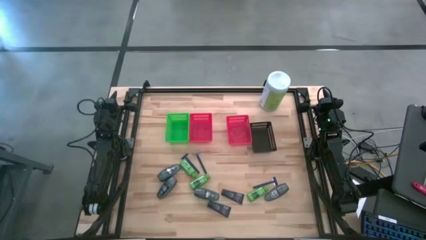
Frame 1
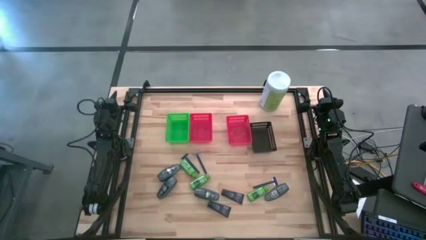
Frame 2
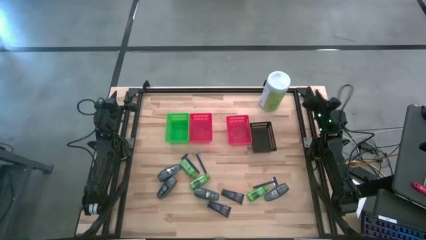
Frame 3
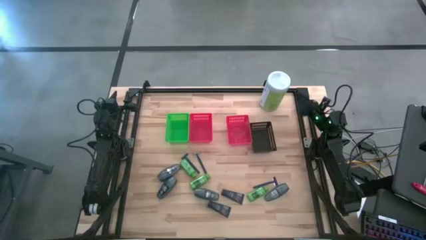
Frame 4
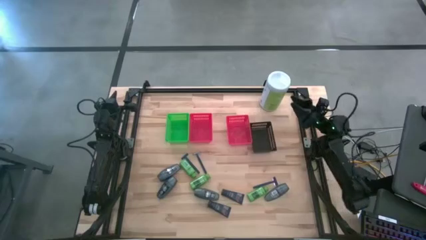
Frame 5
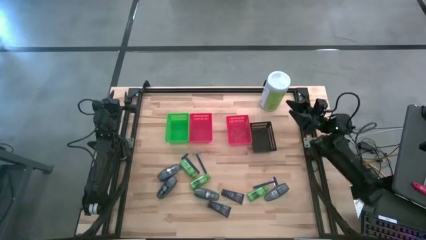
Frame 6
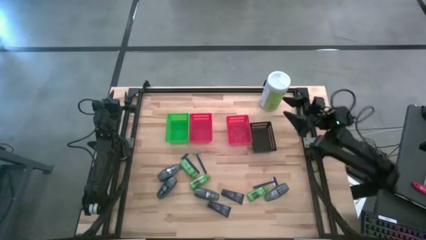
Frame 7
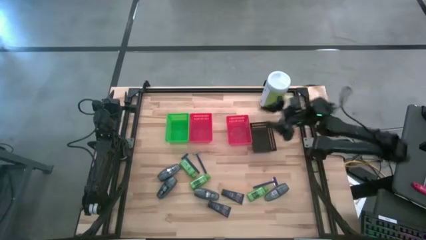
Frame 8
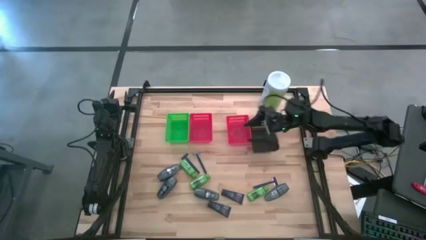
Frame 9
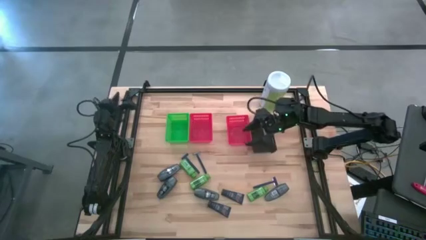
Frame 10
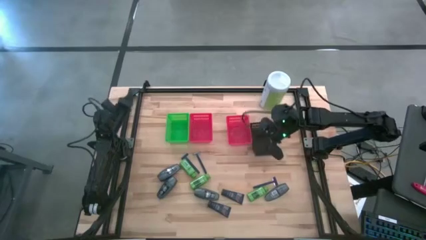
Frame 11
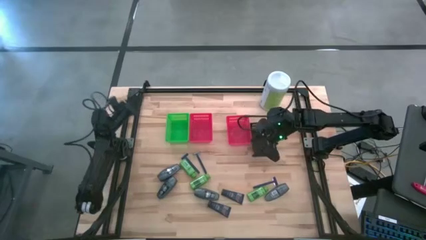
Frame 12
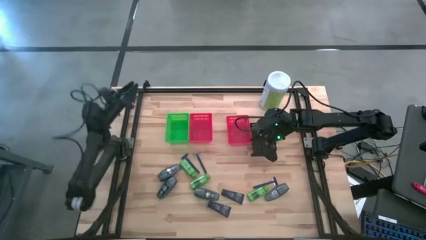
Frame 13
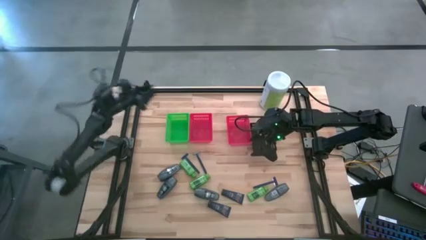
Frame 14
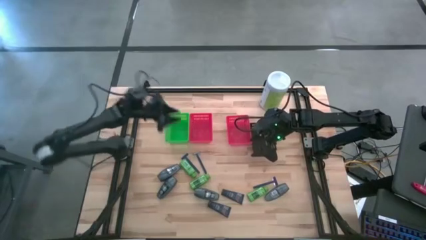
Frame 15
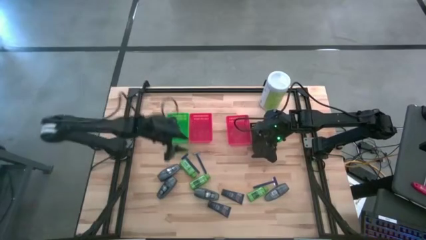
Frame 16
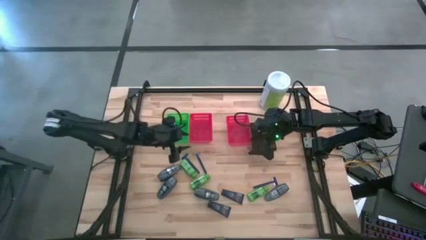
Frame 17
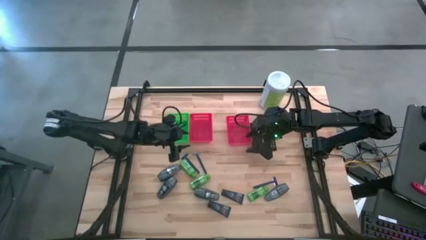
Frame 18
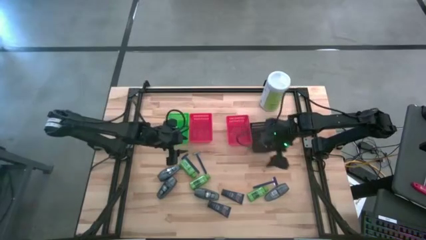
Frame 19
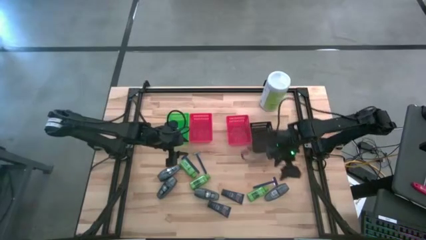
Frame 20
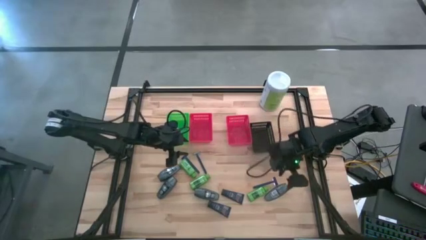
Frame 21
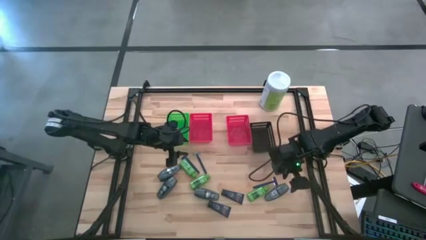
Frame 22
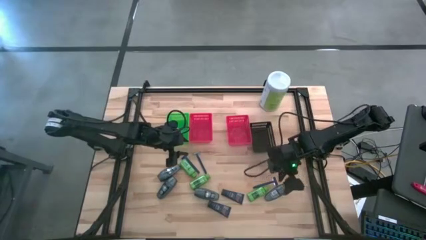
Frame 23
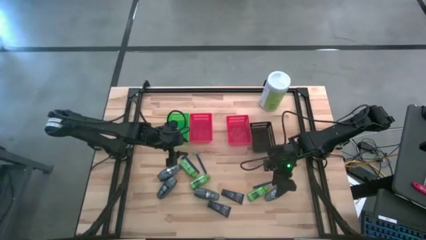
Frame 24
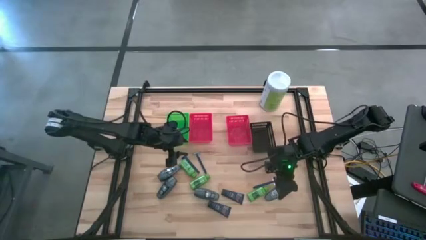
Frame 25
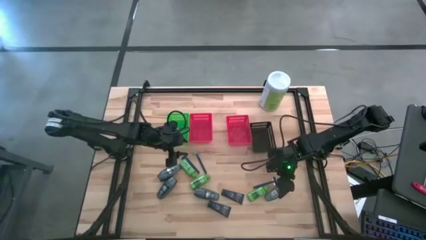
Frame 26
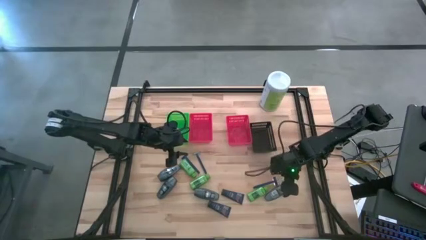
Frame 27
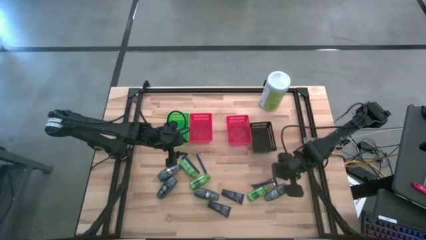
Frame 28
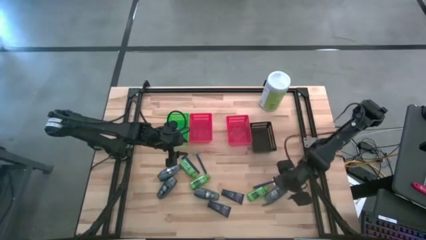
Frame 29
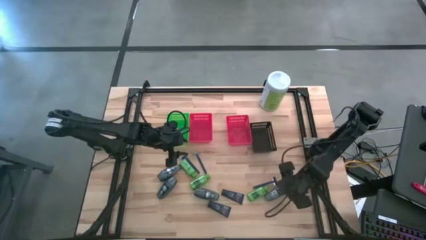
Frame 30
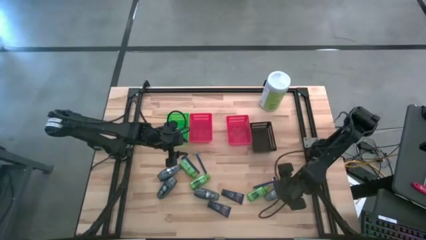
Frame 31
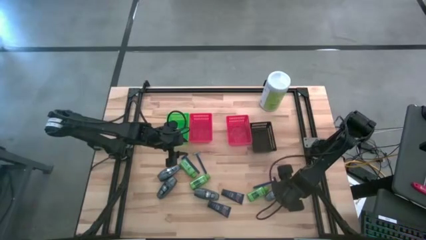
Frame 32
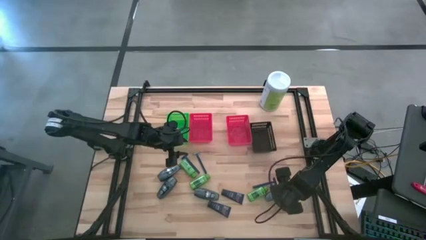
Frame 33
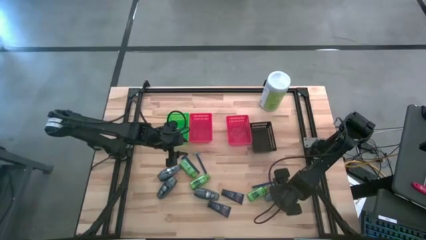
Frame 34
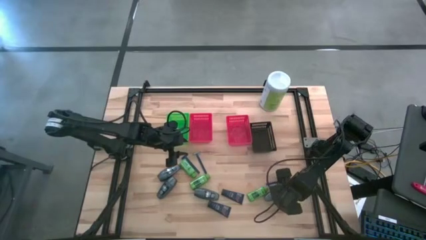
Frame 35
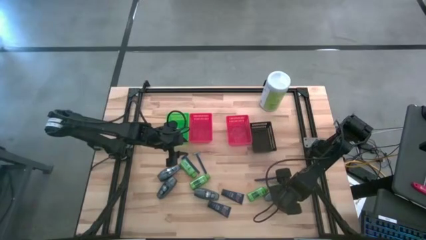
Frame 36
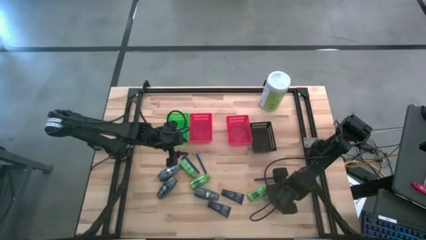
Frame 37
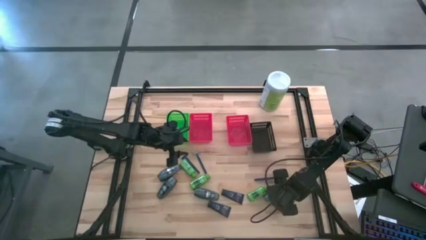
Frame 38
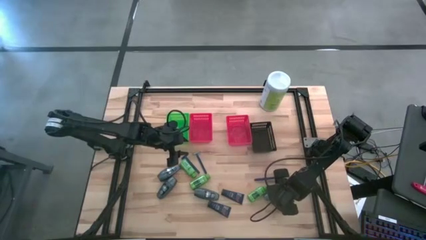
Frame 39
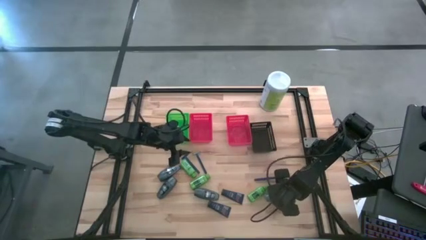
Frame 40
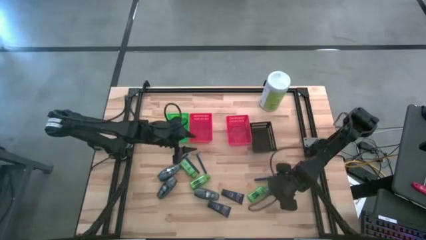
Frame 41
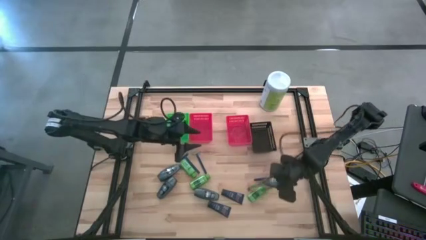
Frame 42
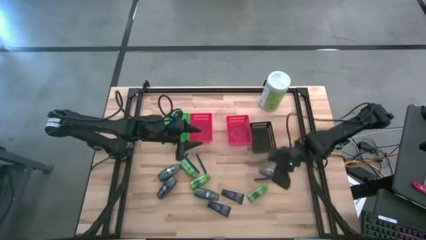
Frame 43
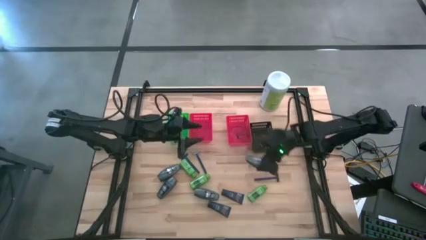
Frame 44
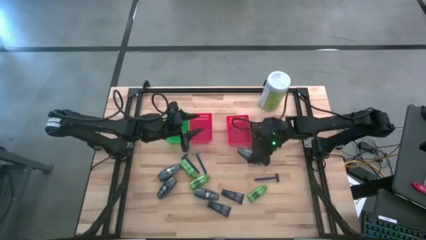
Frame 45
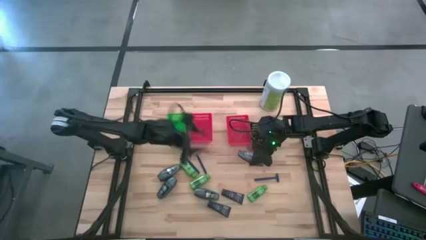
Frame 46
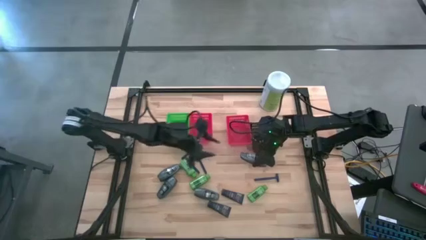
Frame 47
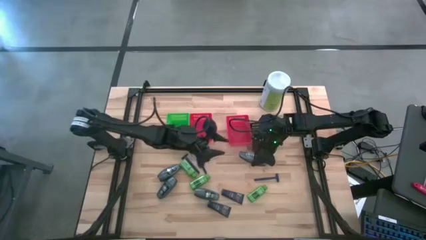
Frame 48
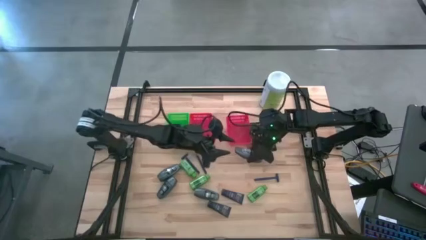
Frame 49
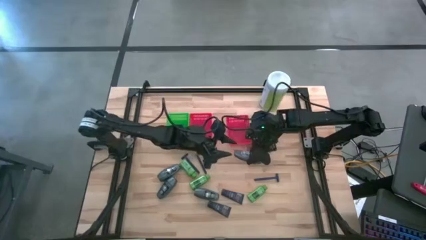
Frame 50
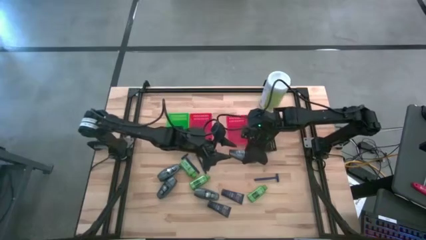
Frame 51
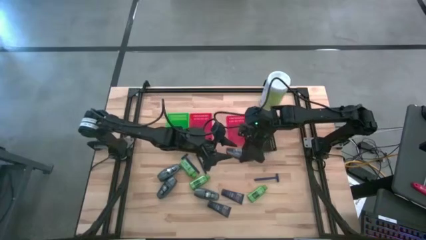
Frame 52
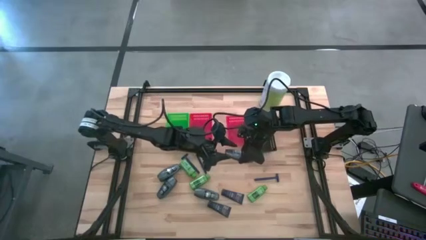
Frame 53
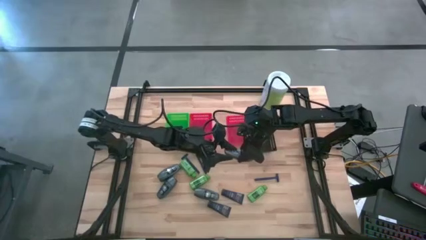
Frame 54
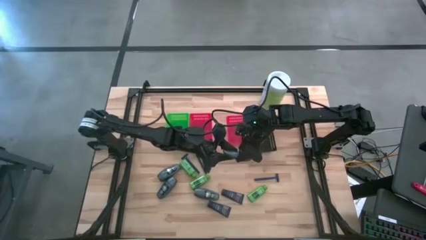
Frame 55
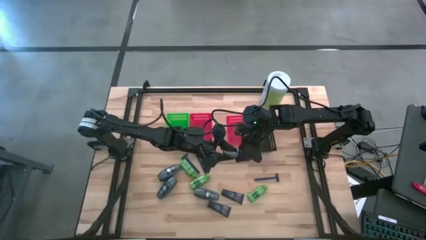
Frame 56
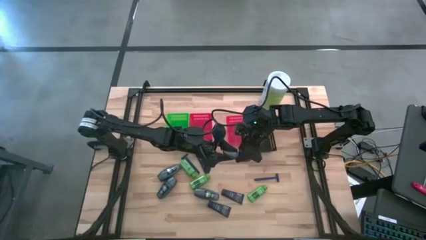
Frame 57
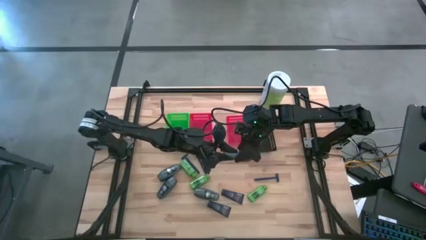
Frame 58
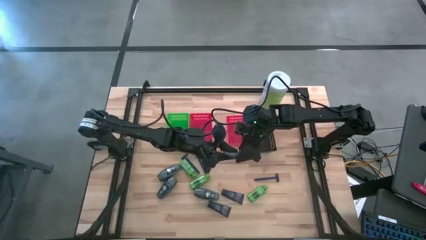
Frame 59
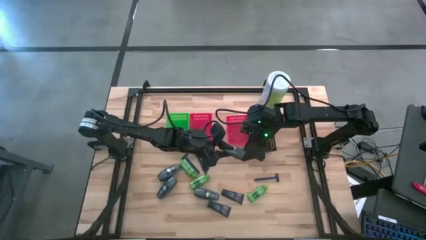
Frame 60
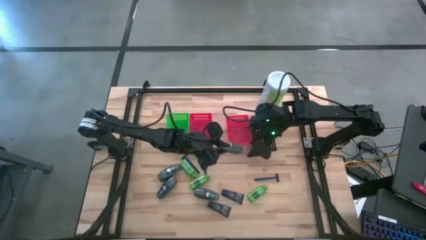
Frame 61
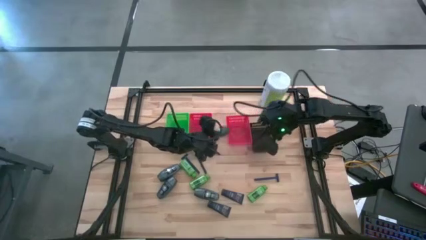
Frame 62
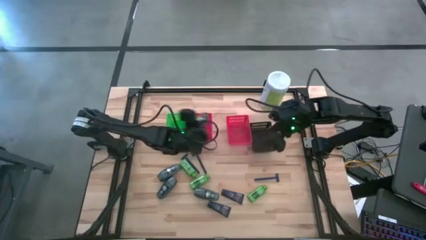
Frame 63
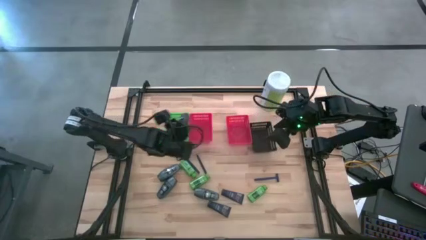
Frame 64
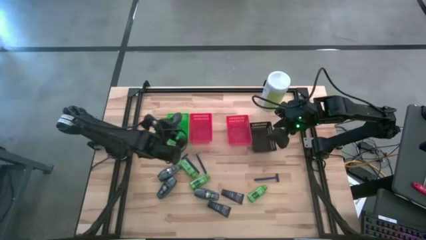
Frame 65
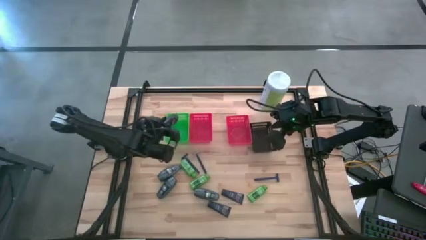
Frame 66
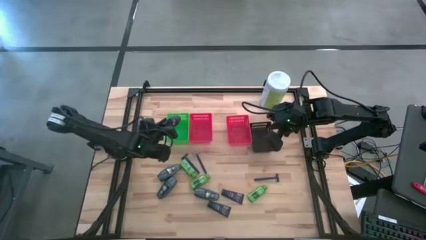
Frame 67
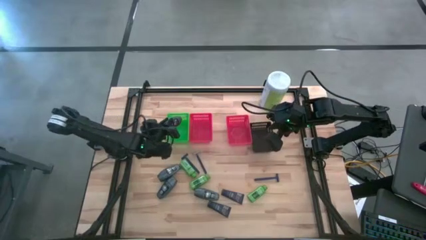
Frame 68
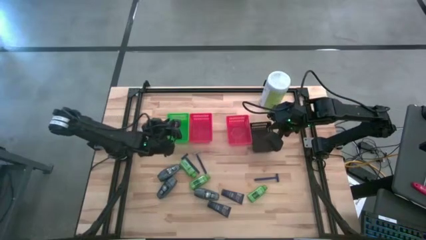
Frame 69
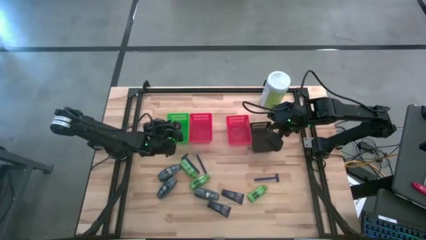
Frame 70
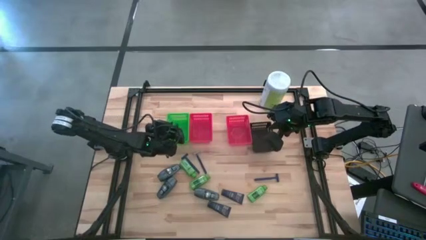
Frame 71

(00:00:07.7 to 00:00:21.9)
Task: Pick & Place Travel size toiletries
Put the gray deodorant into the green bin

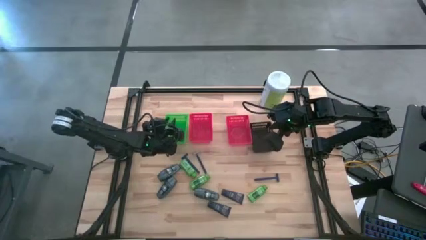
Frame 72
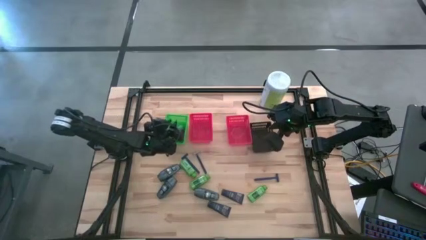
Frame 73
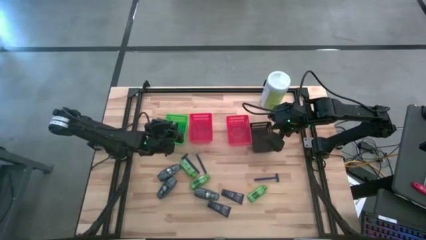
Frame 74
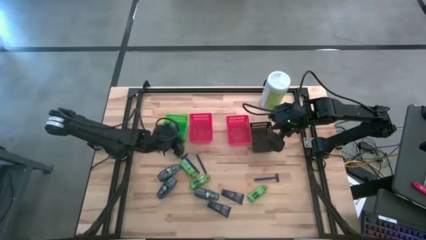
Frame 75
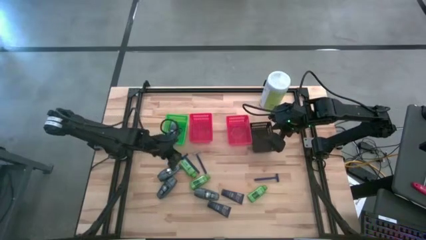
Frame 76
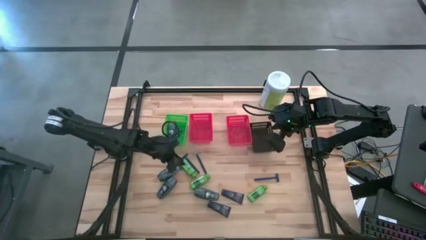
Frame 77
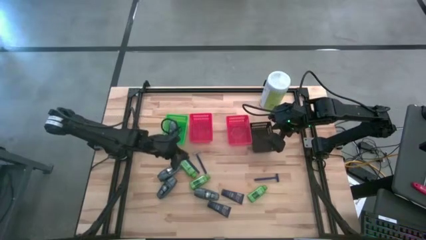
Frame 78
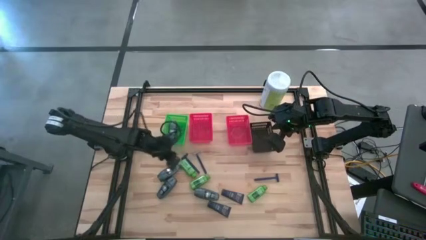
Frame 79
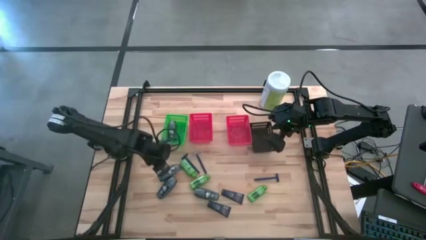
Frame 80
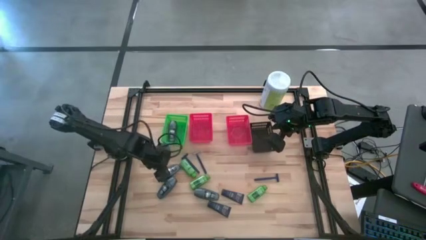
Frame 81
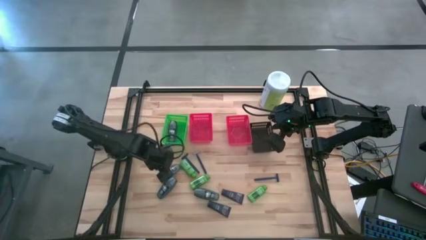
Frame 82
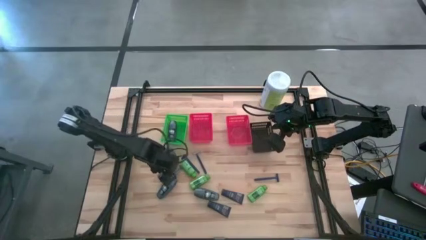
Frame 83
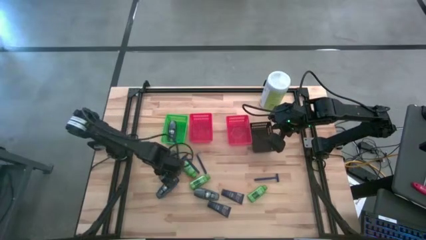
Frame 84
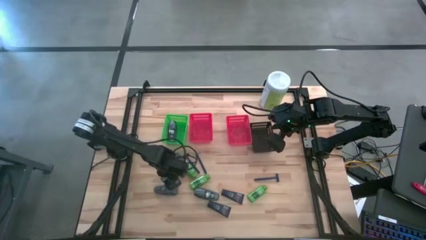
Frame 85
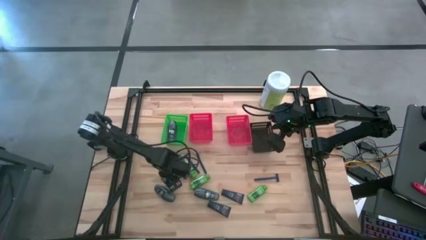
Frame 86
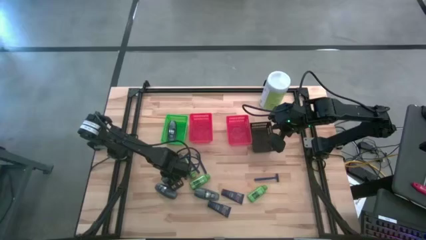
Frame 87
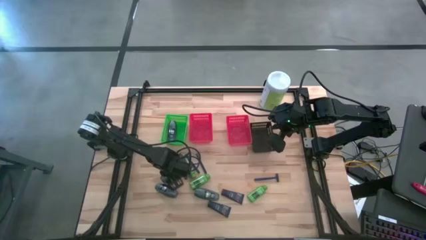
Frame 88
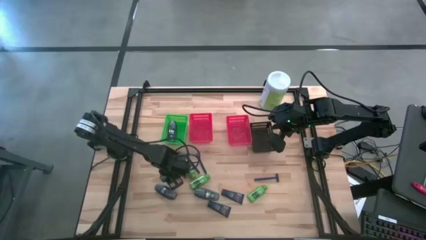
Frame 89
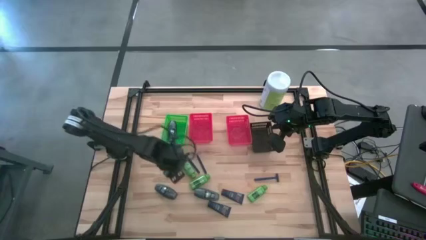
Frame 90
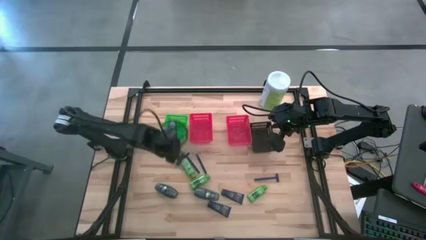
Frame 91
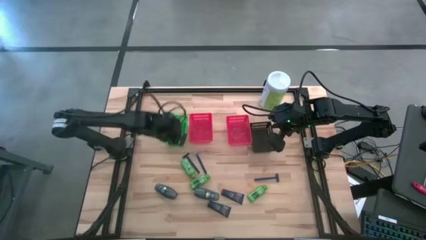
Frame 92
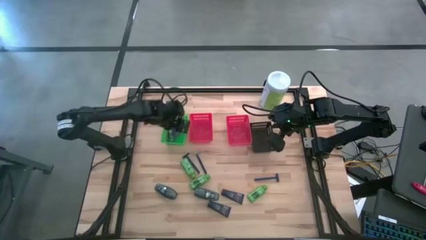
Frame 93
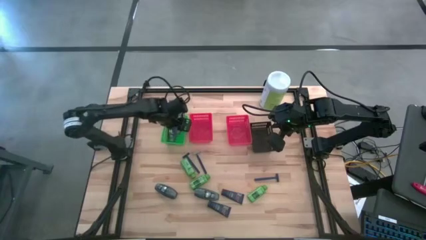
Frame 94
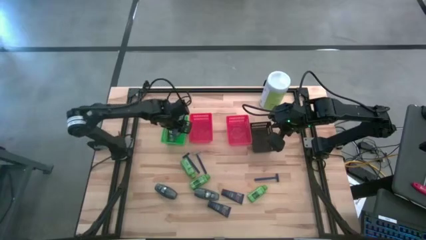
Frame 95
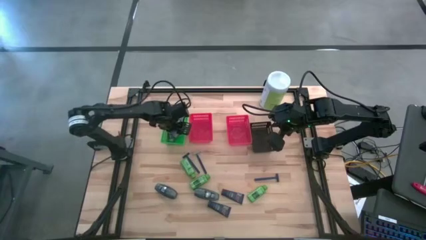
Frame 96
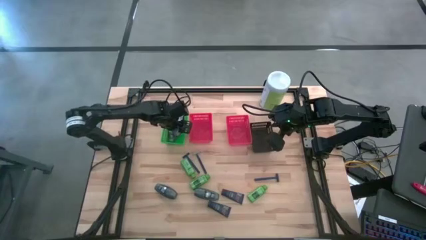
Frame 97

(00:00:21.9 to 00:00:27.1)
Put the gray deodorant into the green bin
